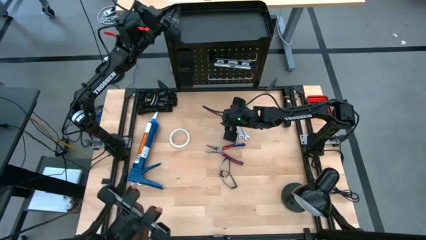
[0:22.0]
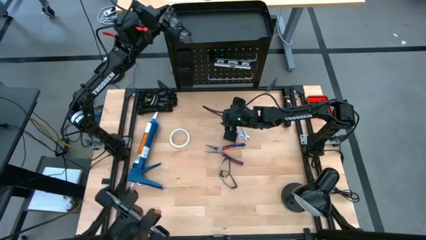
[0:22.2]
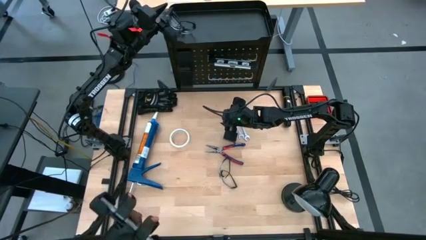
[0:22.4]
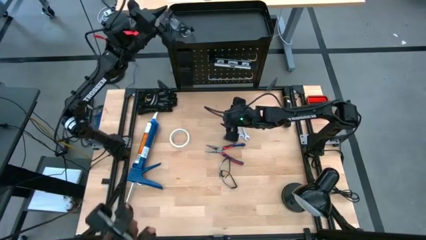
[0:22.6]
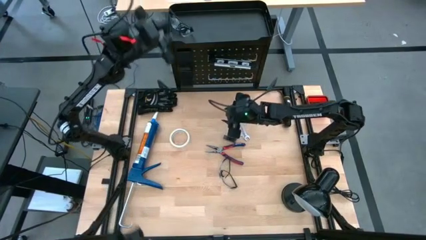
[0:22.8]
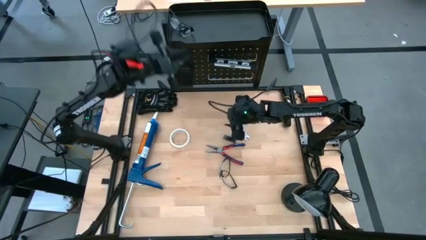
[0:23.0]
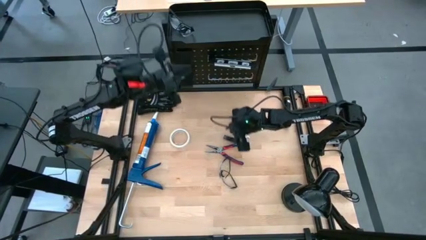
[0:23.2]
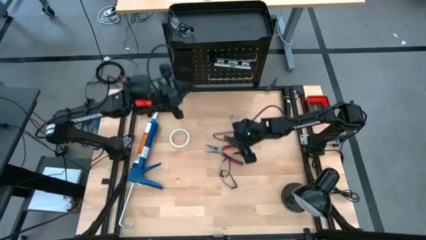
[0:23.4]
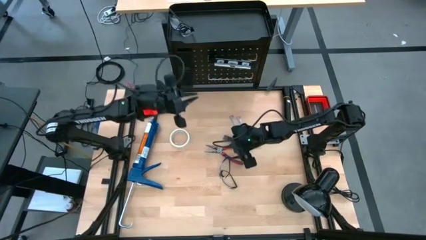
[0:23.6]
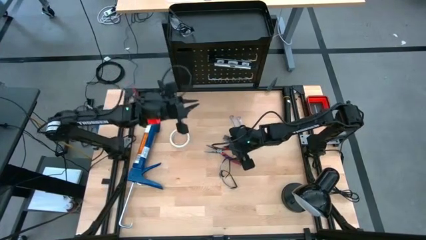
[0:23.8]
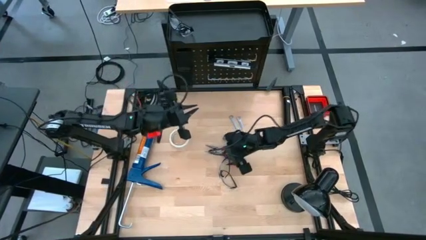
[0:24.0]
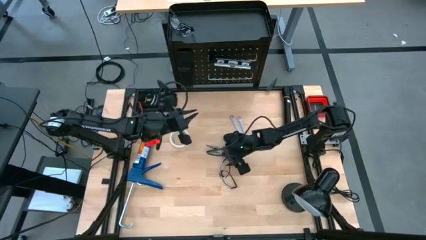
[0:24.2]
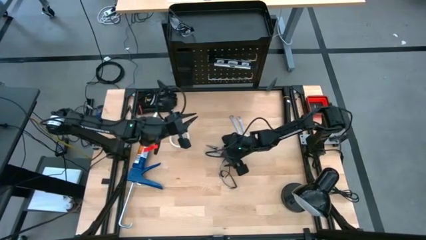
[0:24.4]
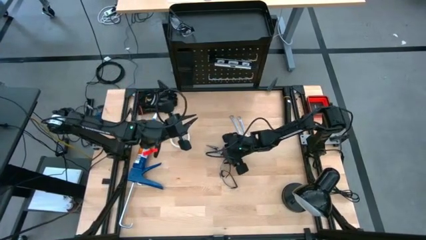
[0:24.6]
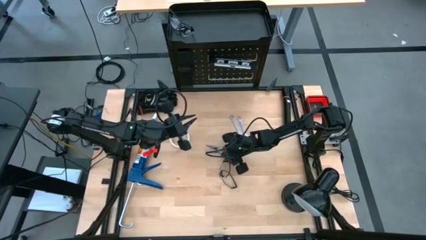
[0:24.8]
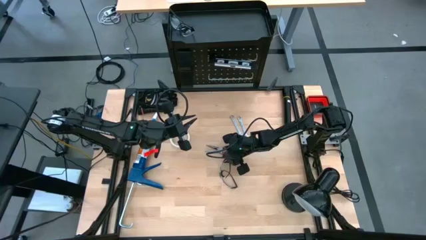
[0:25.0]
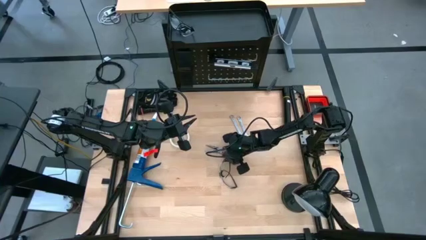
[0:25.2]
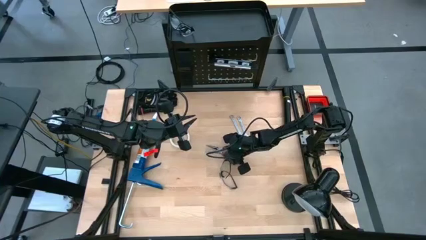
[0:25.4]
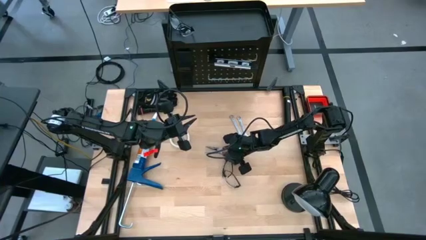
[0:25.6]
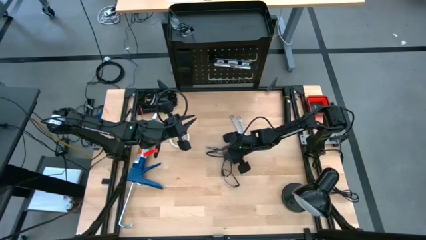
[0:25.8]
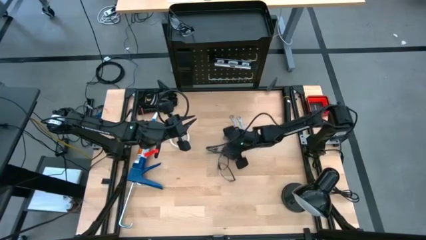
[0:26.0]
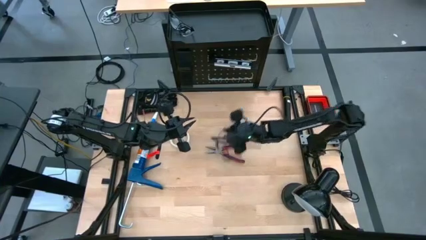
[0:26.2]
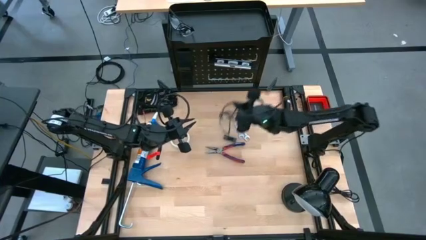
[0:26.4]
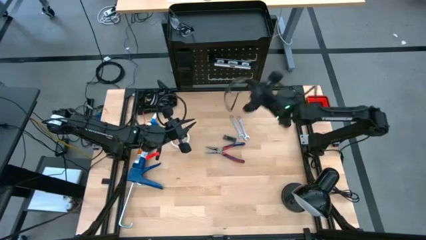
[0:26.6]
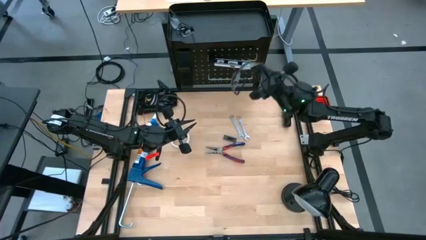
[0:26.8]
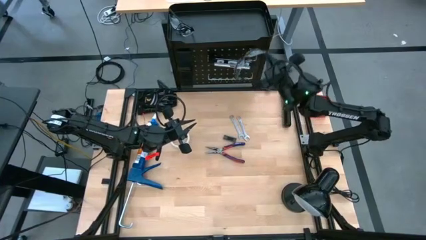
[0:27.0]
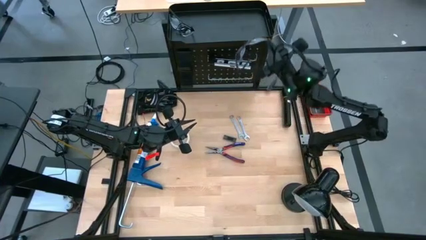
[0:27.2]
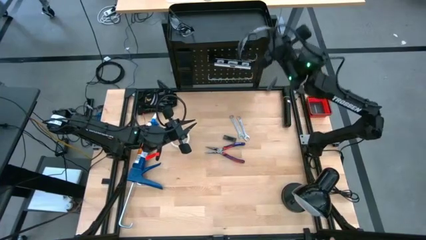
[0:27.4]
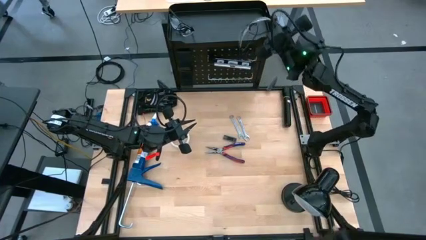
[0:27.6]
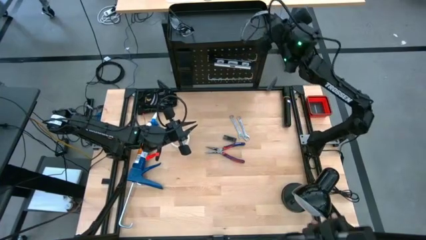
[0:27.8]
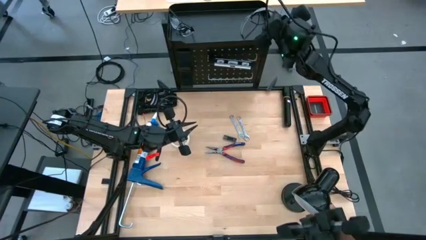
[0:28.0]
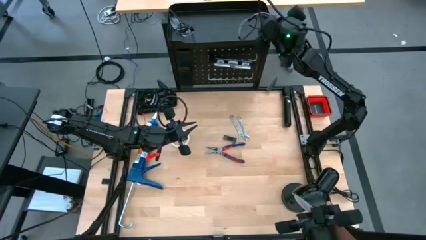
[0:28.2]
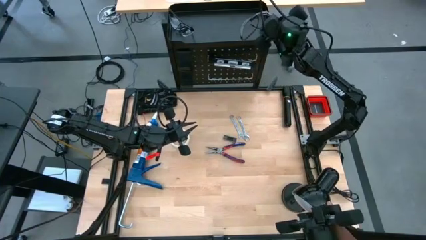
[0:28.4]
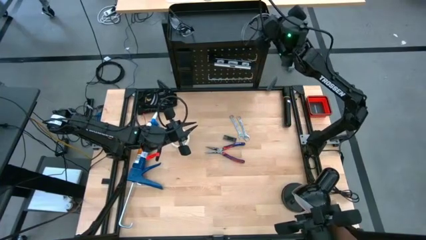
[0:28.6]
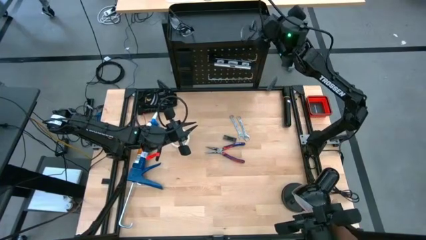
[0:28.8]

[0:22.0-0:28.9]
Task: Hang tools onto peg board
Put the safety goggles on the peg board bin

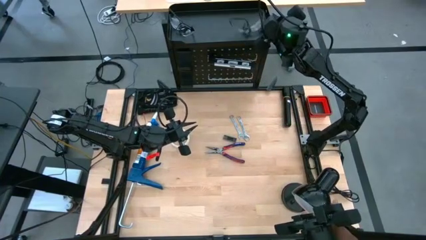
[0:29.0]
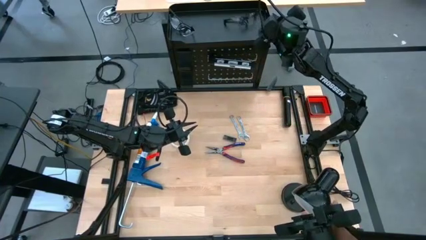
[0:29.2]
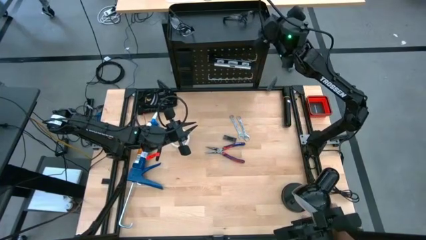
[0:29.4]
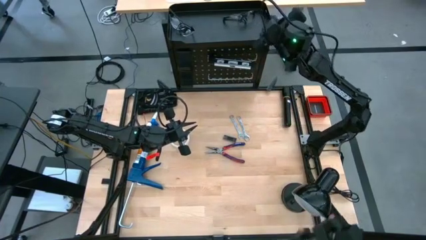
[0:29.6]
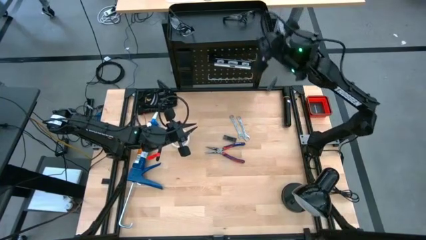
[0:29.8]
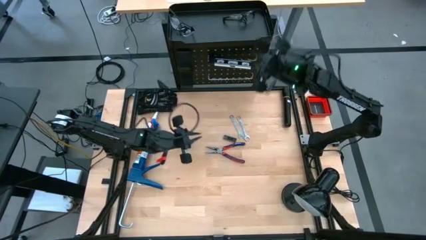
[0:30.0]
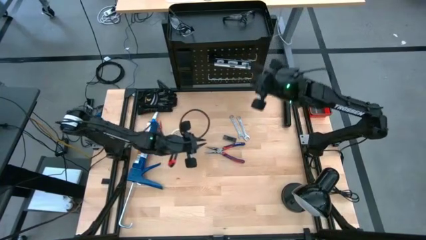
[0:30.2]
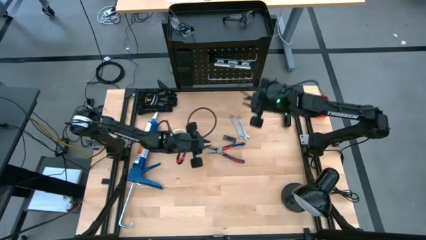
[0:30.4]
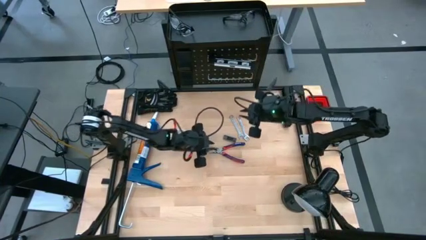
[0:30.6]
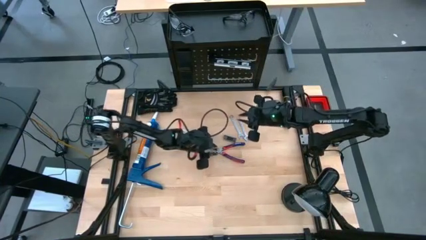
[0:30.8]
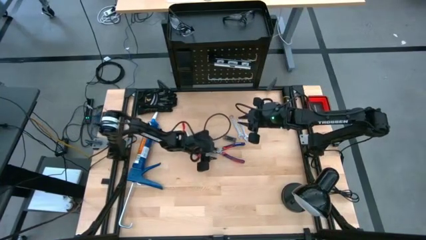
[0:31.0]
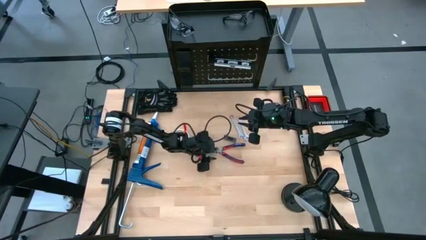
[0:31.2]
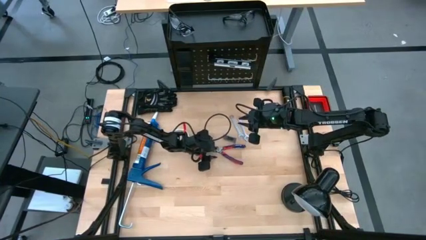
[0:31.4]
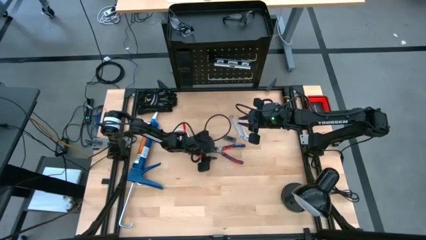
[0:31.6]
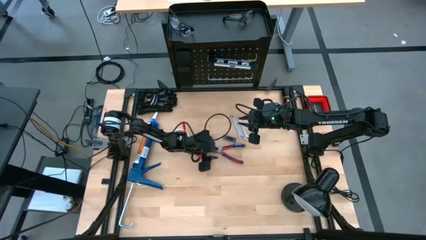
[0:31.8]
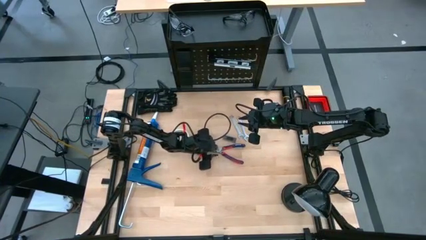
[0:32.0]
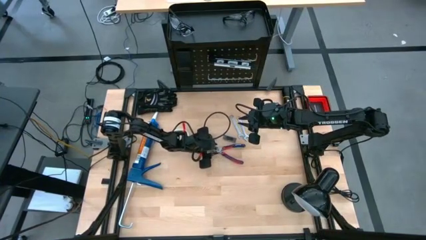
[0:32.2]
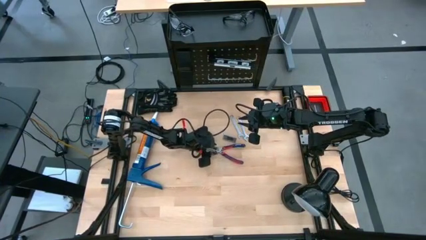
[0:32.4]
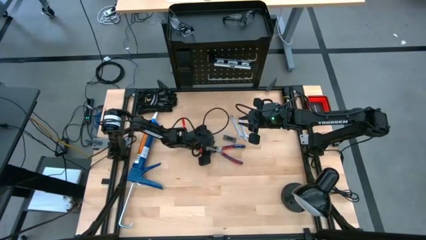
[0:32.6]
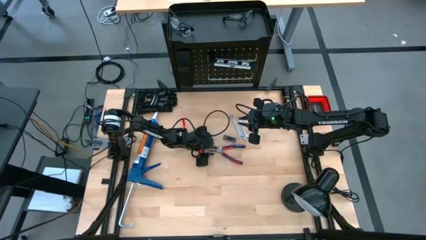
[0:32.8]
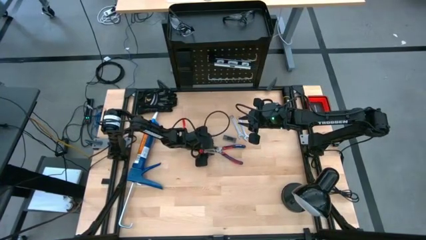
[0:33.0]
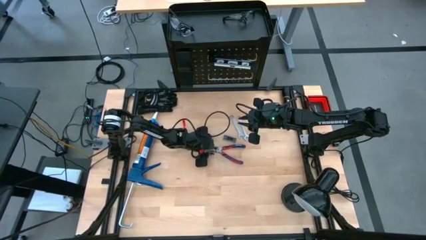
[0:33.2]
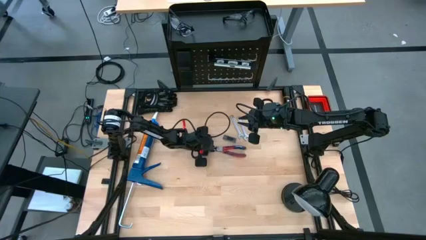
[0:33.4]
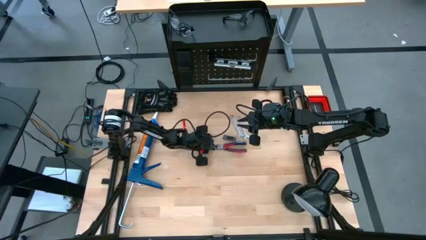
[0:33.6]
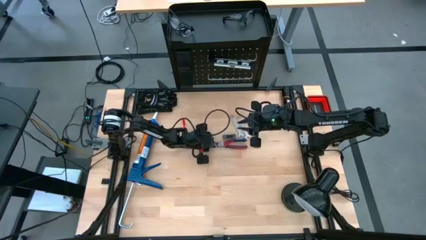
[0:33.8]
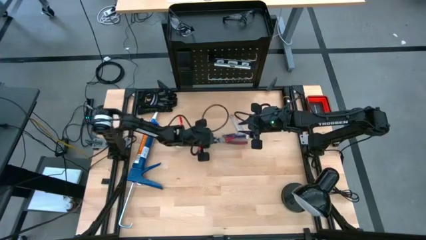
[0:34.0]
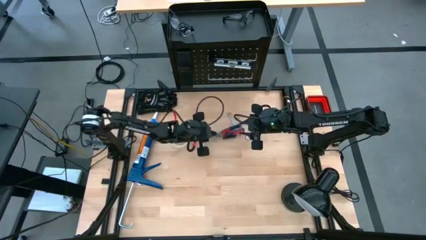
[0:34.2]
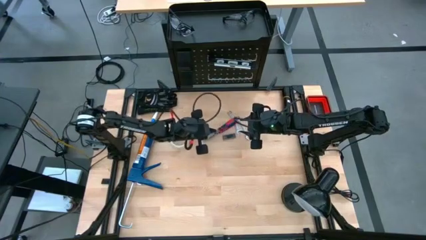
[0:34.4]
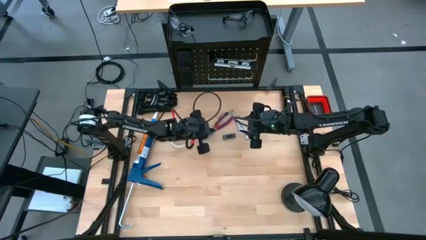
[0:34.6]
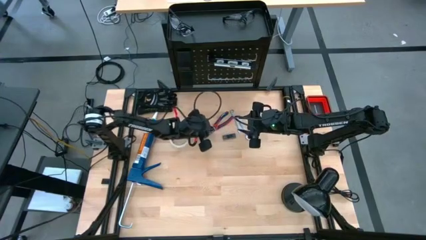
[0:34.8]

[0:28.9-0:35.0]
Put the pliers on the peg board bin

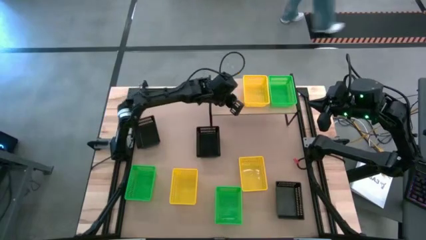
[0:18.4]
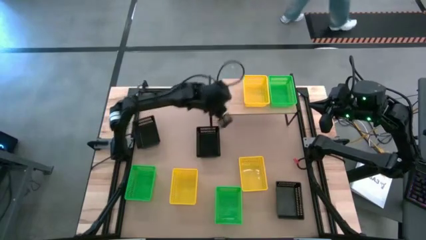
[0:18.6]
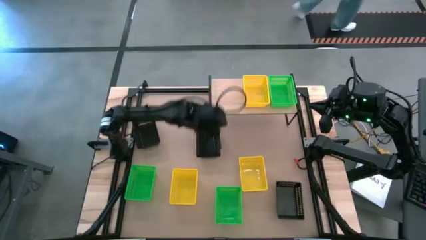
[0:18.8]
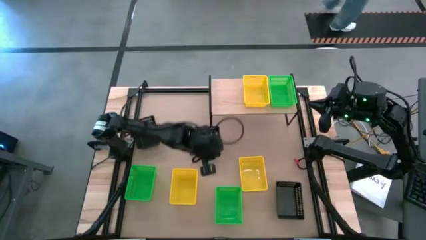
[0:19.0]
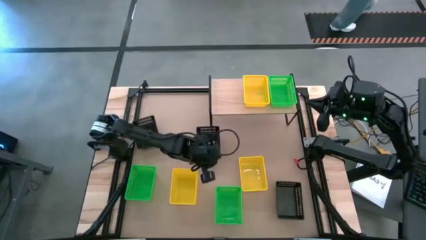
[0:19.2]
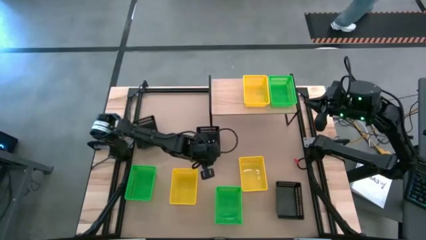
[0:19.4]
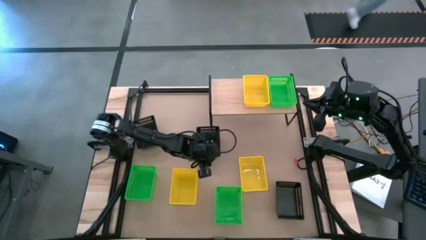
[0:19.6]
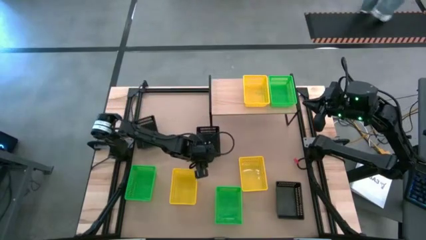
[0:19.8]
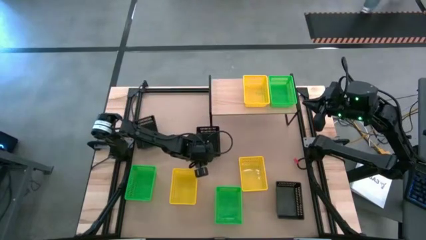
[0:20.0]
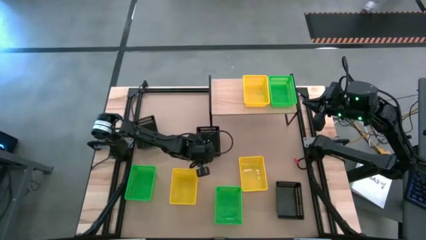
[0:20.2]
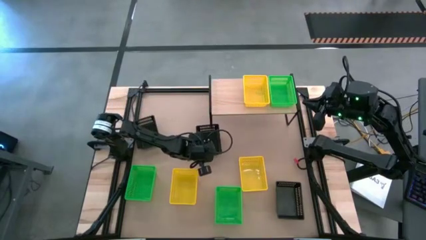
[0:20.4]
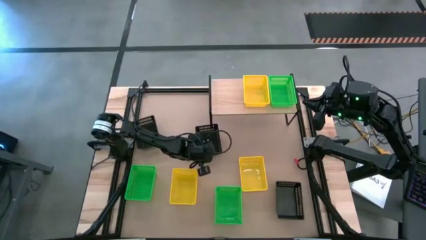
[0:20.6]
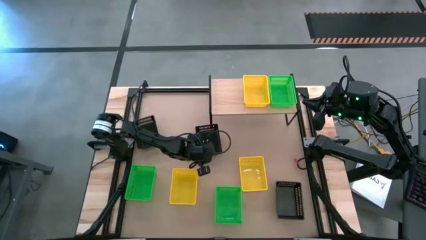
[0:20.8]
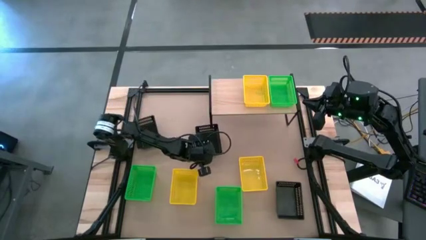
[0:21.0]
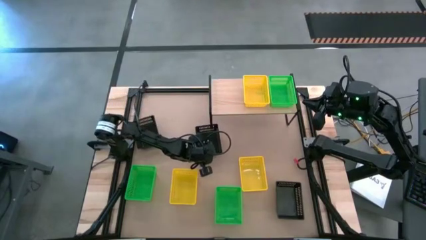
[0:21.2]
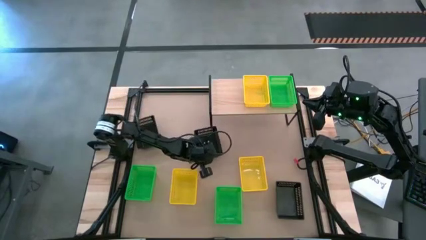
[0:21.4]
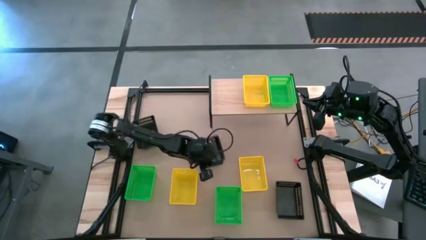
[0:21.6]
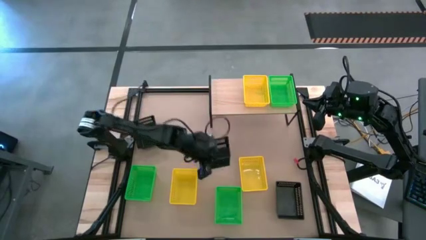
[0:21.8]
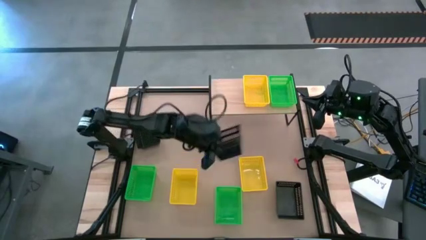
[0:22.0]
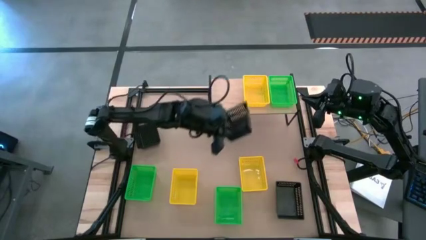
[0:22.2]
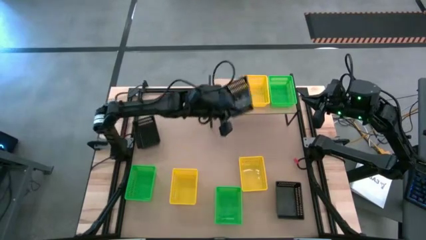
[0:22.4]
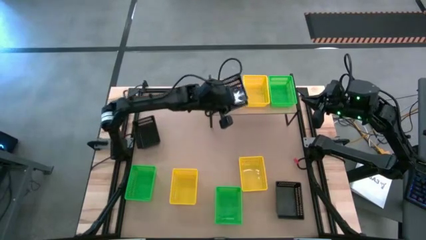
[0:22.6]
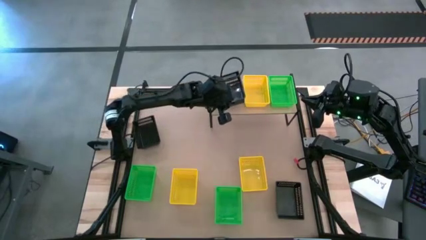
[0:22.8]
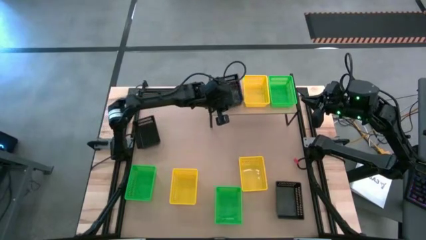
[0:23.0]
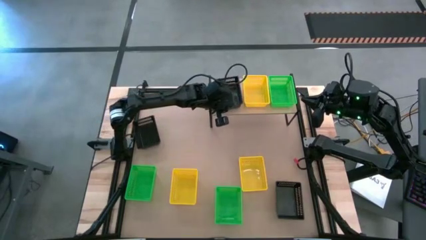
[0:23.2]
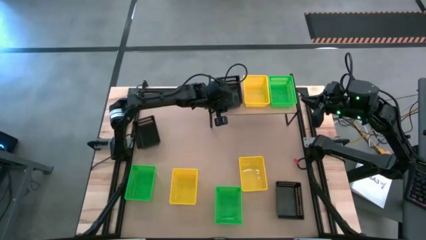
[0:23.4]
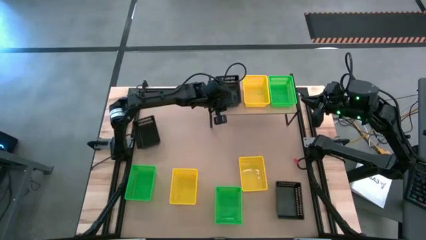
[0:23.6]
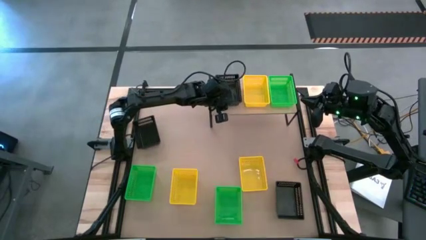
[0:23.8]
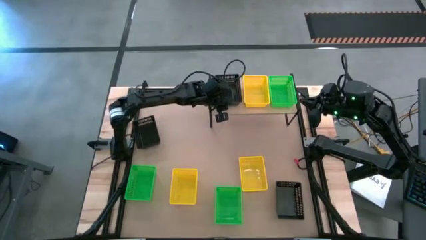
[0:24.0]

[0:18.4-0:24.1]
Task: Stack baskets on shelf by color
Put the top right black bin on the shelf
